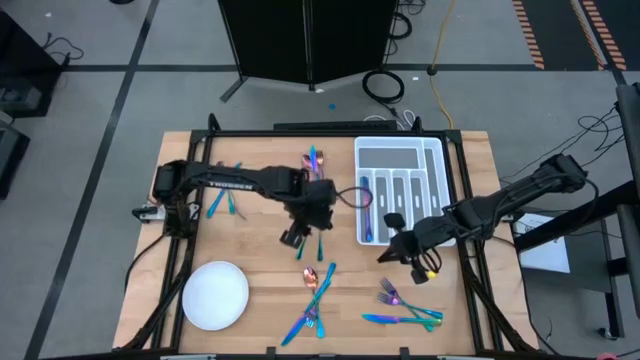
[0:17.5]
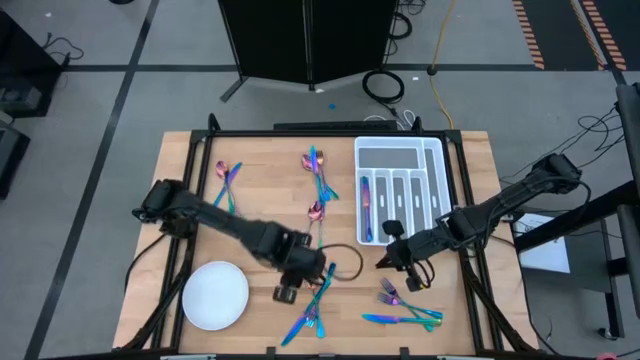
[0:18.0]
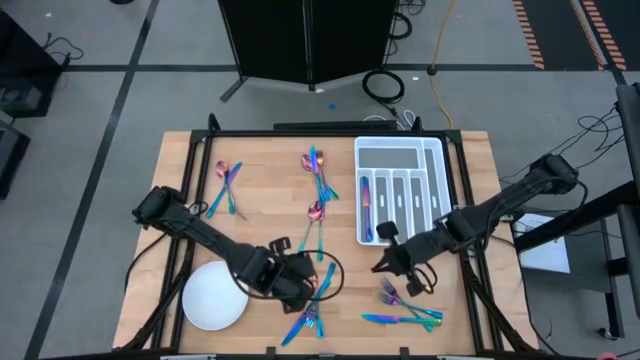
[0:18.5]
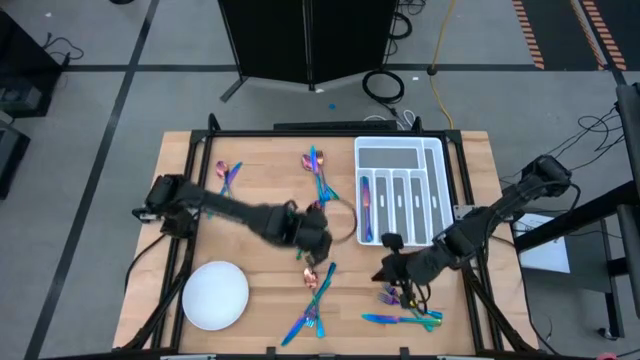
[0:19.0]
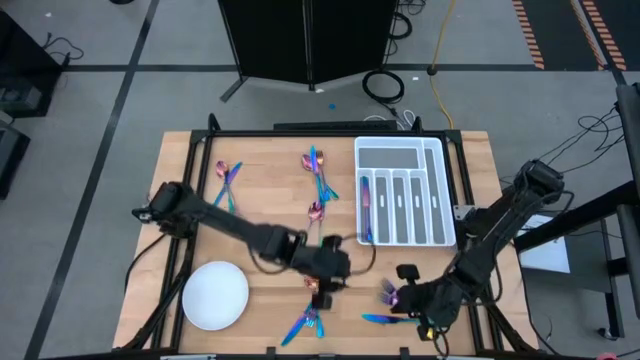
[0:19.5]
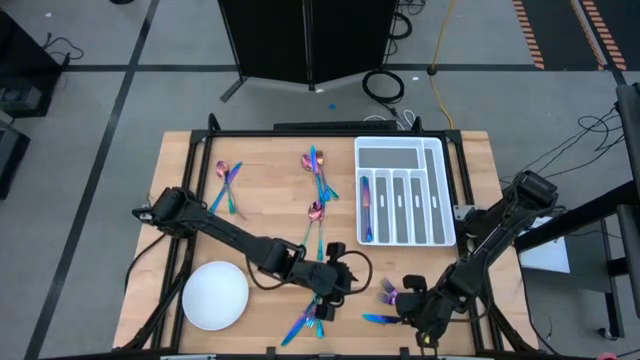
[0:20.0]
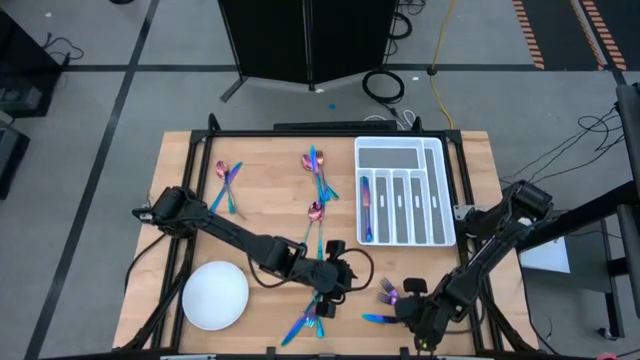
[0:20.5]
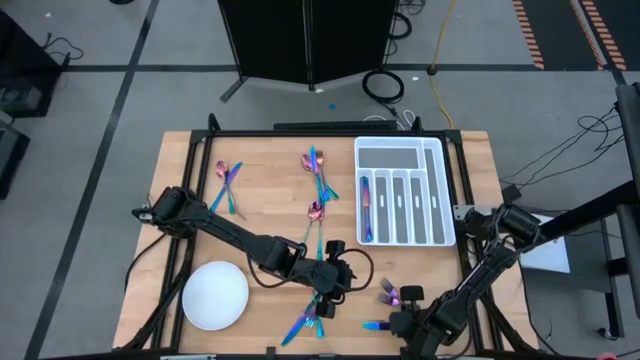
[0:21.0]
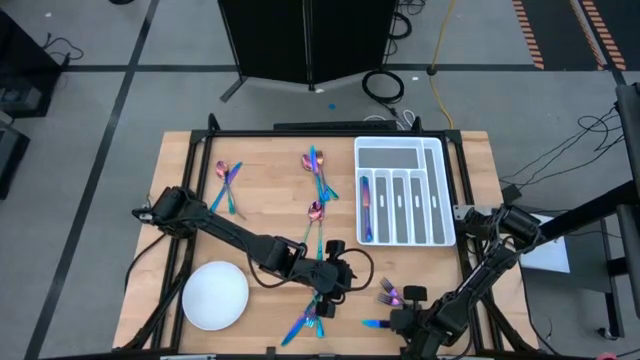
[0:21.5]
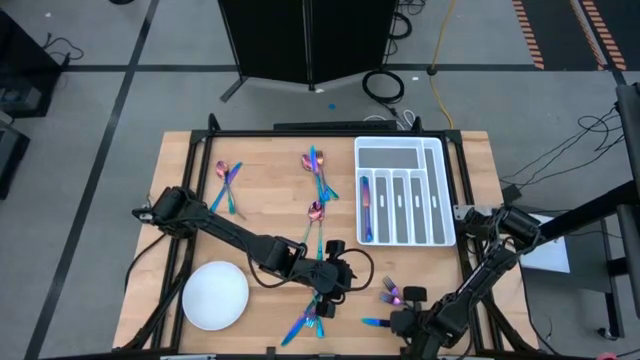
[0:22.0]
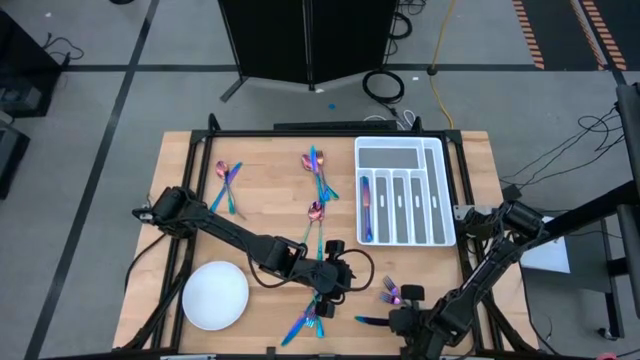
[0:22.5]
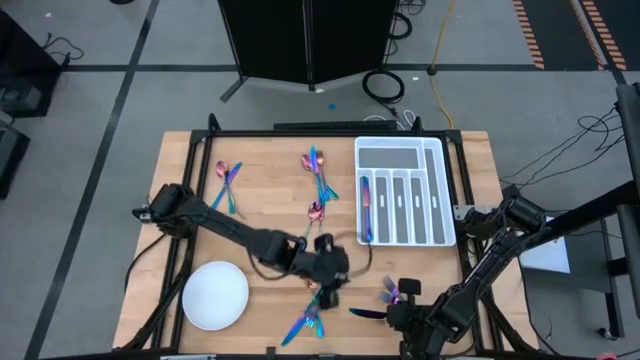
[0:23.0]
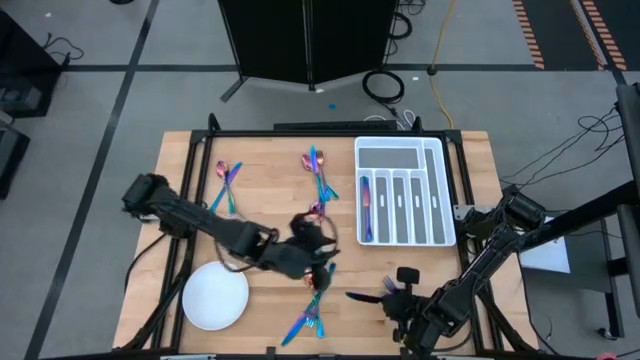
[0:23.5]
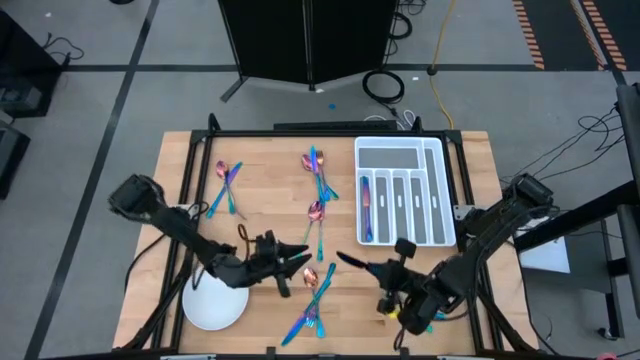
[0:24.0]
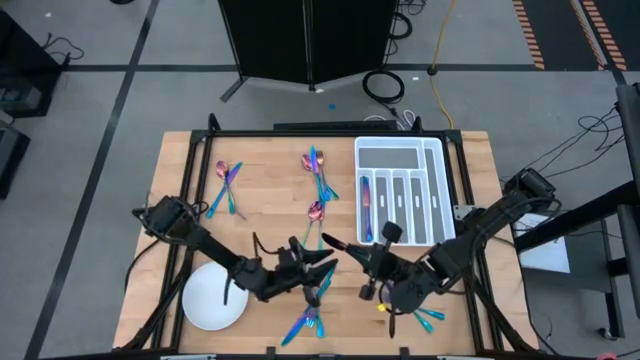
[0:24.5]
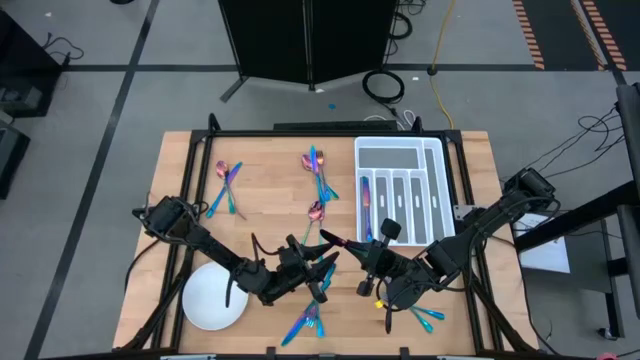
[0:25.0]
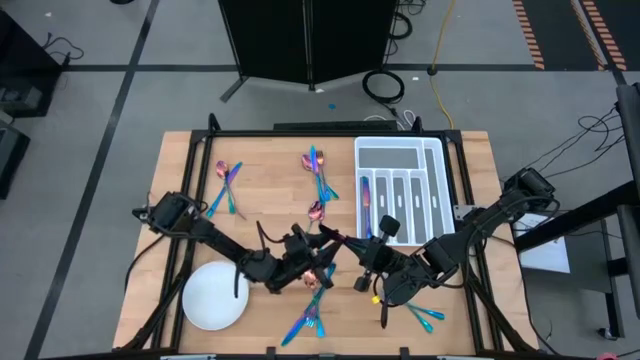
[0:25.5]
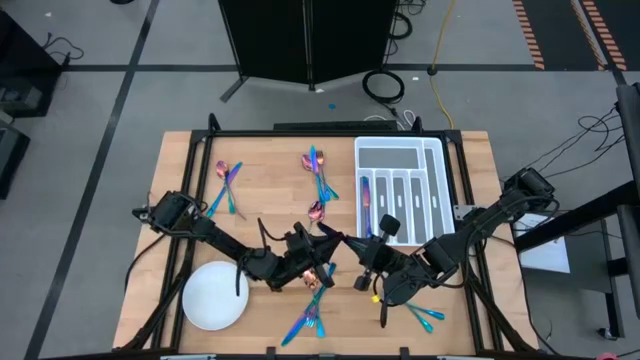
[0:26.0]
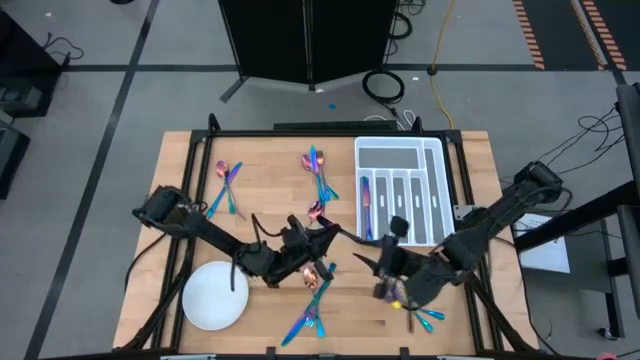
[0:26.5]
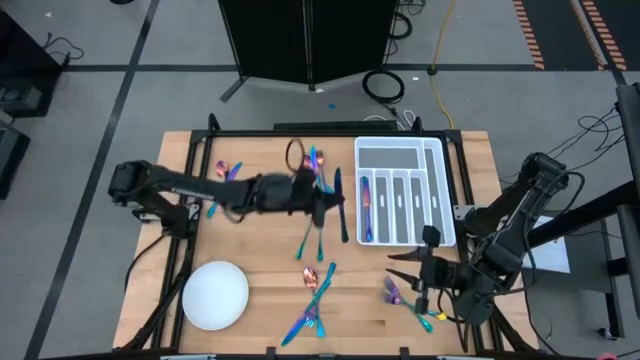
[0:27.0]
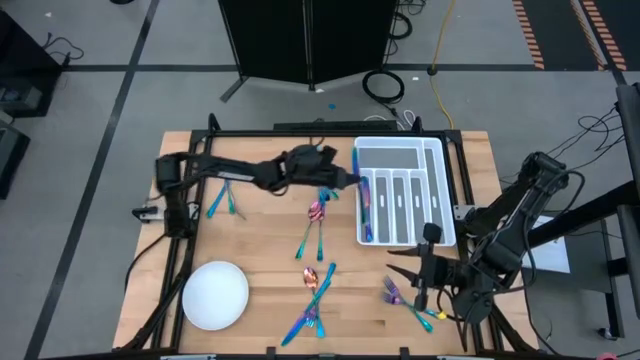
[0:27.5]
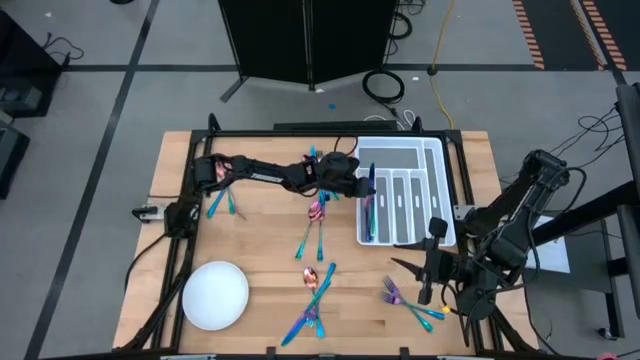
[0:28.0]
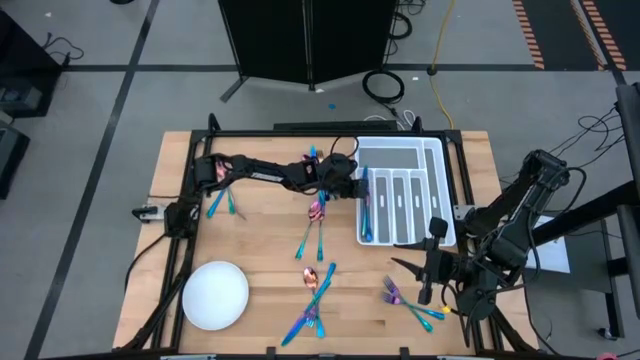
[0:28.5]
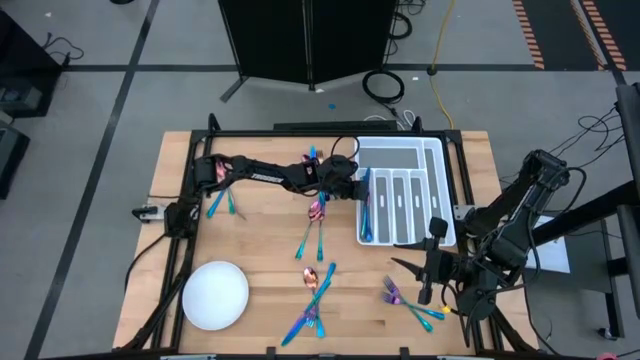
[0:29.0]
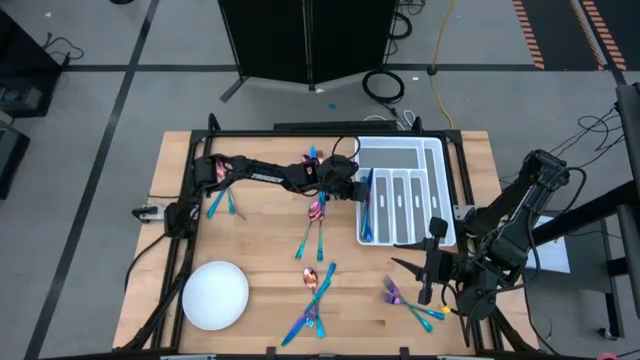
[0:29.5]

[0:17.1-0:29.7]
Task: Sort silverware
Put the blue knife into the utensil organizer
